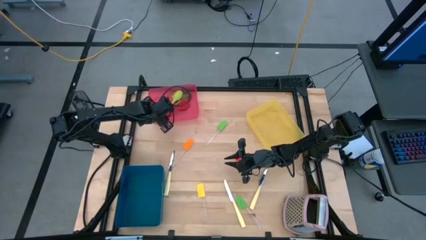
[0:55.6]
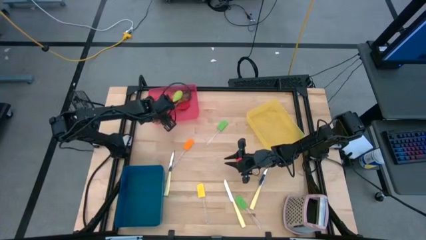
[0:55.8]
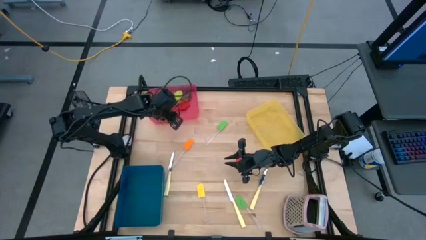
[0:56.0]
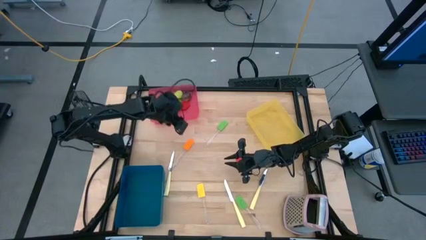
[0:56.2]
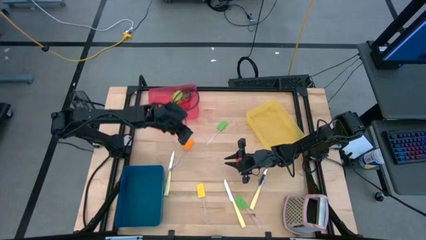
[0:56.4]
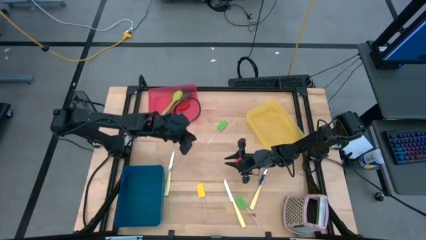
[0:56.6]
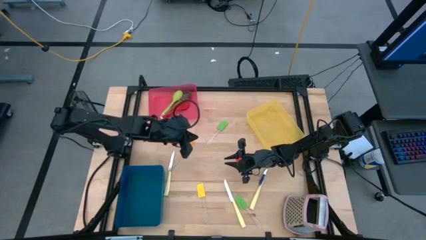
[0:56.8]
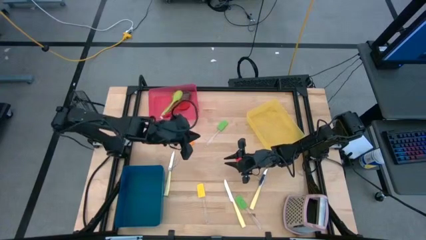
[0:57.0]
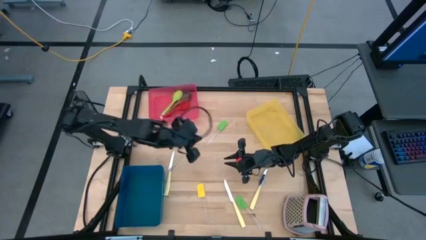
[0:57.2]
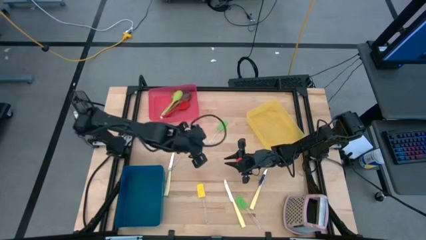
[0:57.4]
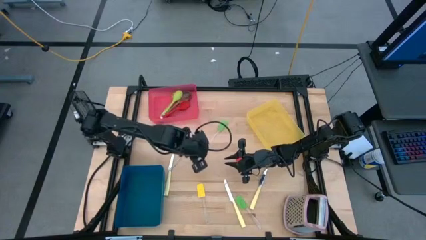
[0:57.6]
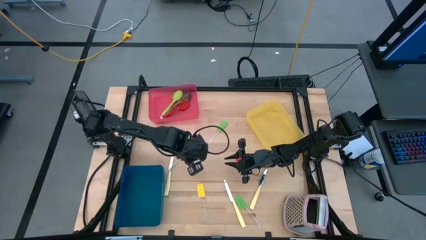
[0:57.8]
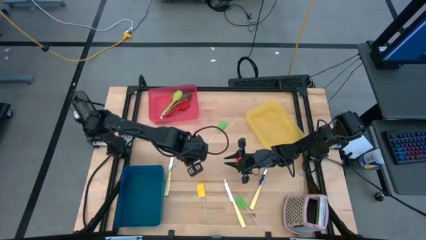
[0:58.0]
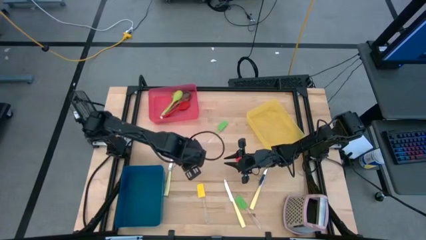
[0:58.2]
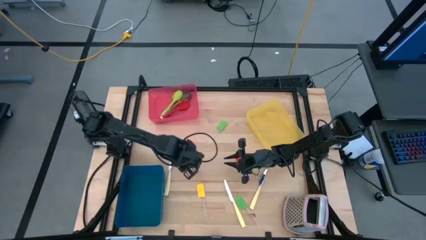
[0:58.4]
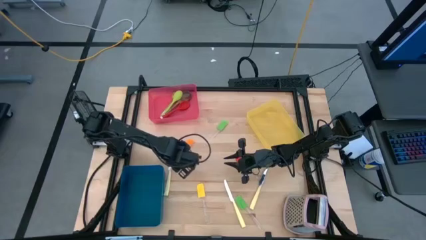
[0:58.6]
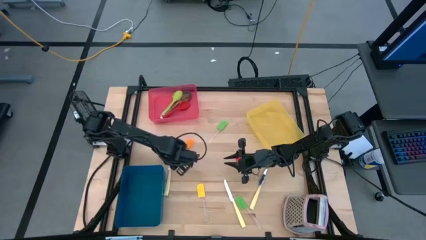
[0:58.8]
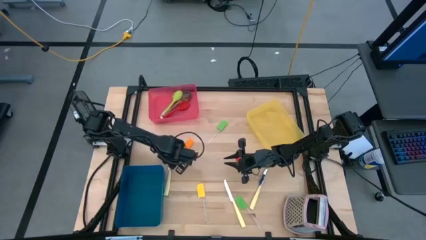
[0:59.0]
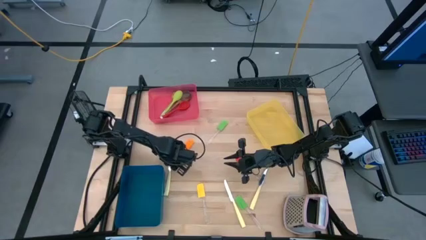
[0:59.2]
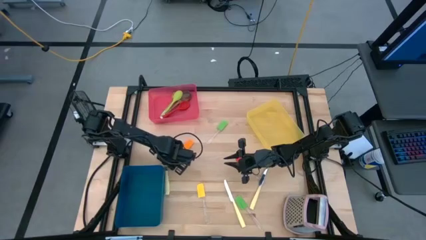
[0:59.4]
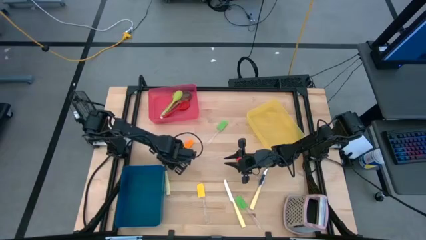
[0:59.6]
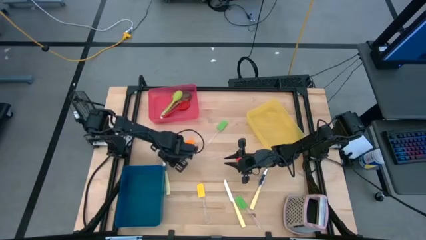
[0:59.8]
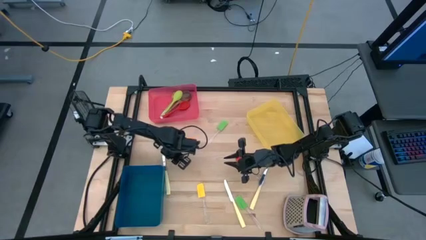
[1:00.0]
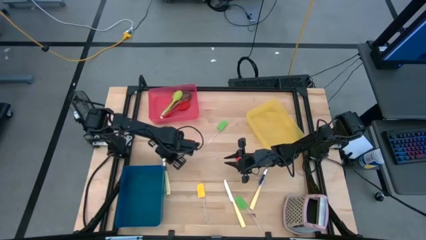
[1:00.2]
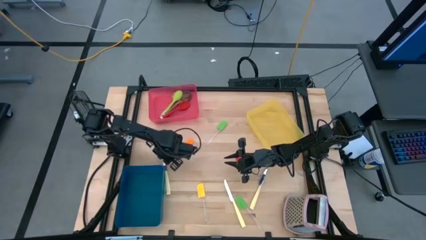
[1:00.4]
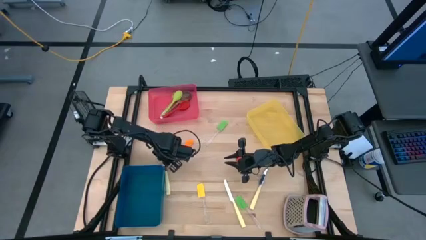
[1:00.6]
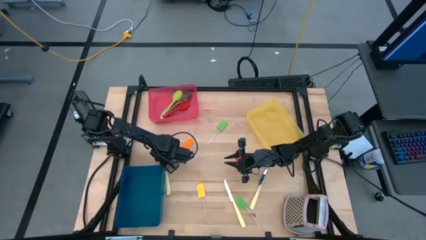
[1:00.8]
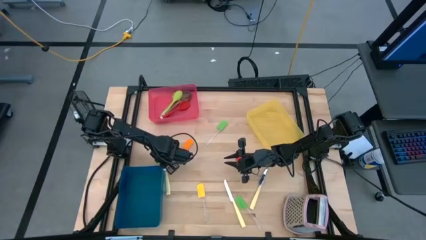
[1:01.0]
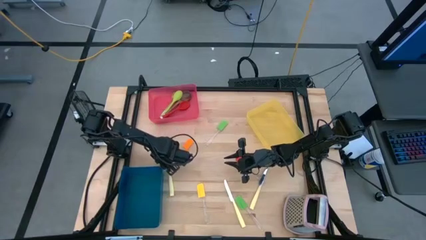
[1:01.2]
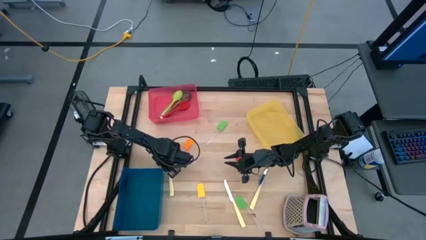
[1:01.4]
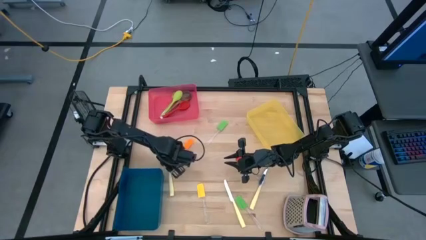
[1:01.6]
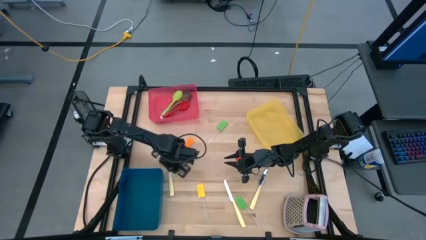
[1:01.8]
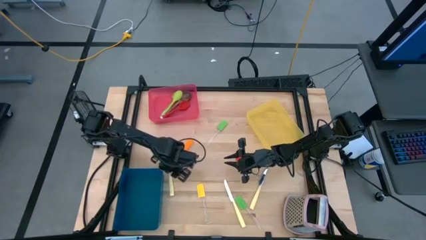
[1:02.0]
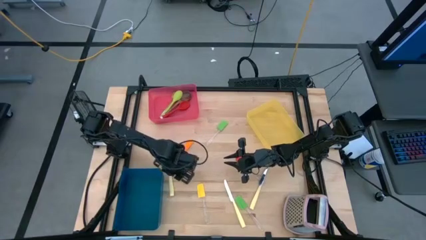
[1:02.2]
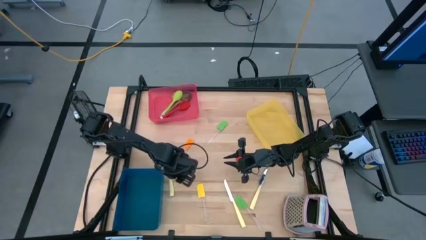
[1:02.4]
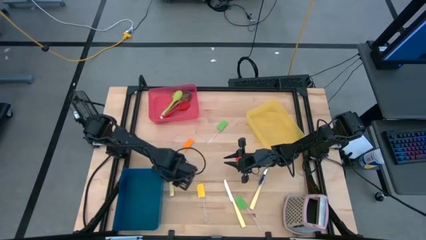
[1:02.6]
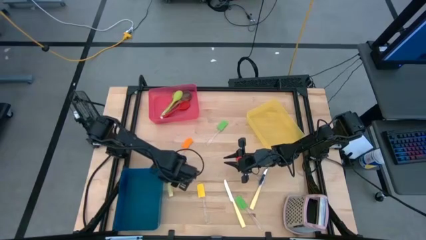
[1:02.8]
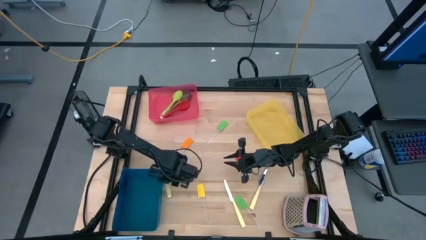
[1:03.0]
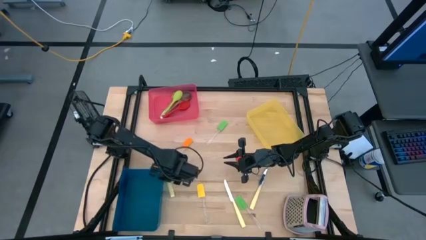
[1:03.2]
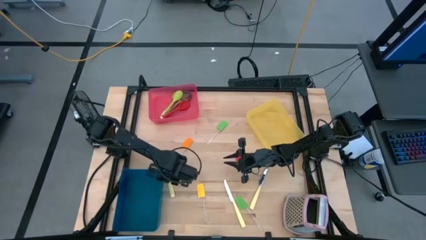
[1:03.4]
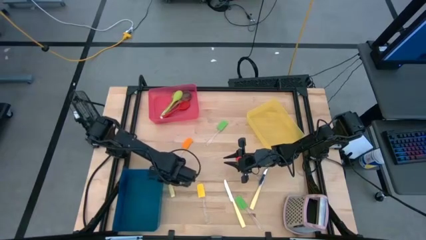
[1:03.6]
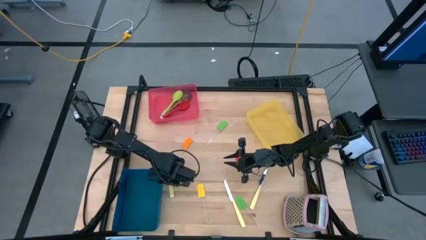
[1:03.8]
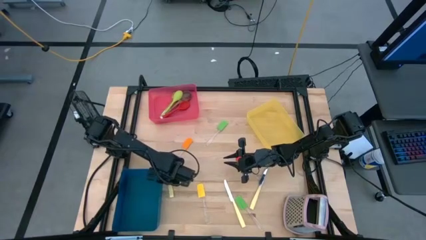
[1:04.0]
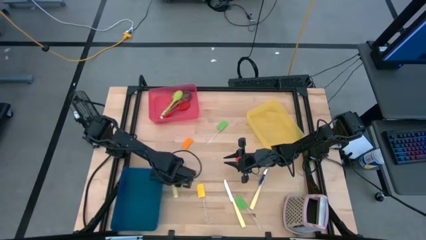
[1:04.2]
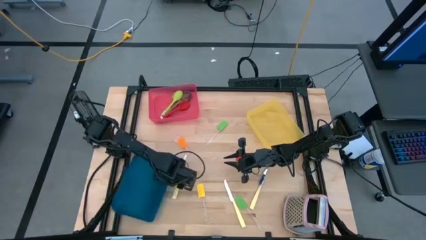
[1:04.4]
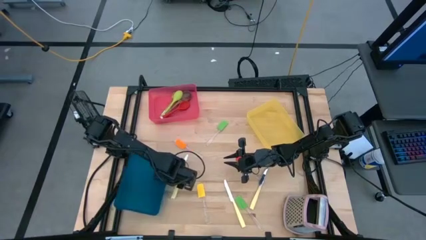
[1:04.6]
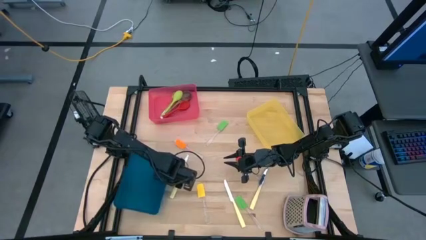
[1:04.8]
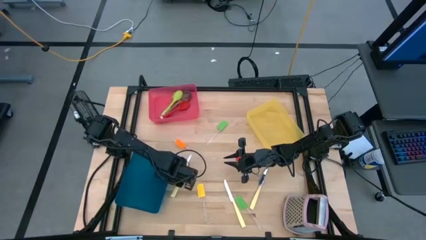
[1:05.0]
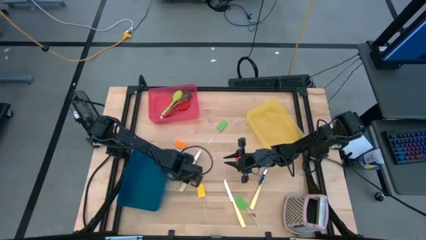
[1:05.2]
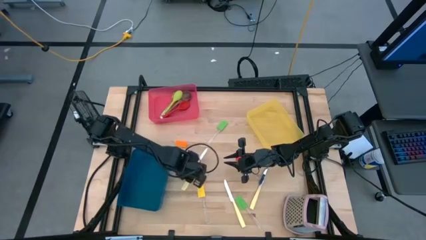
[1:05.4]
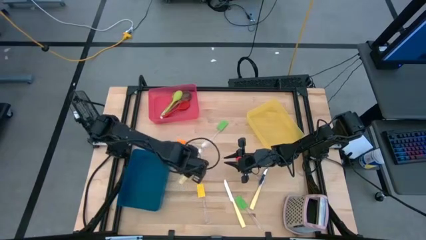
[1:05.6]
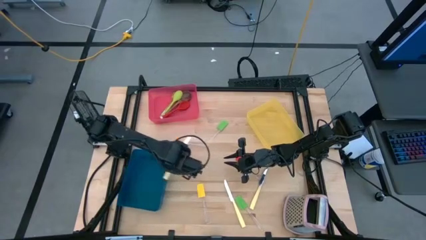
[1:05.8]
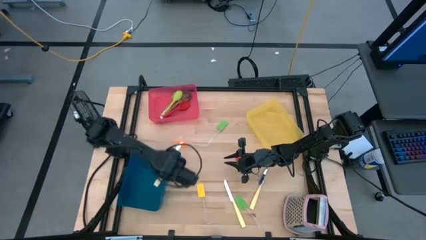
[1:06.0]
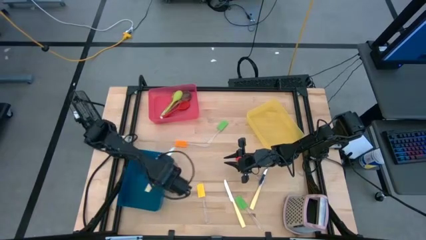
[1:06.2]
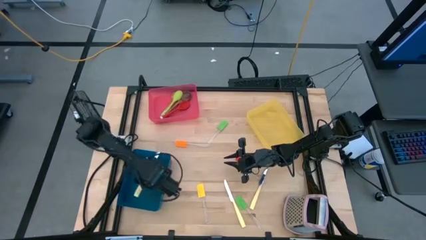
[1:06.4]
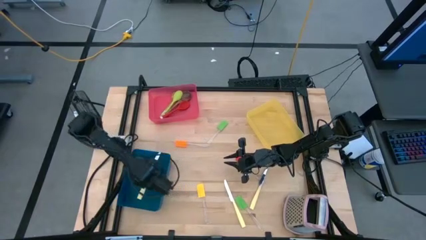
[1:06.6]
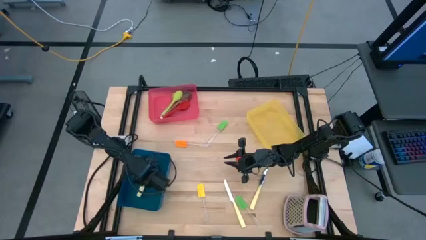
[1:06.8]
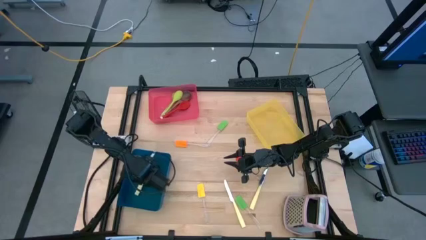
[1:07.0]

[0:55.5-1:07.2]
Task: Pick & Place Kitchen Items
Put the left kitchen knife into the blue bin
